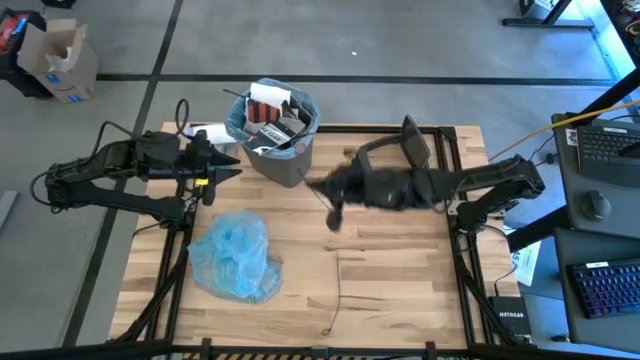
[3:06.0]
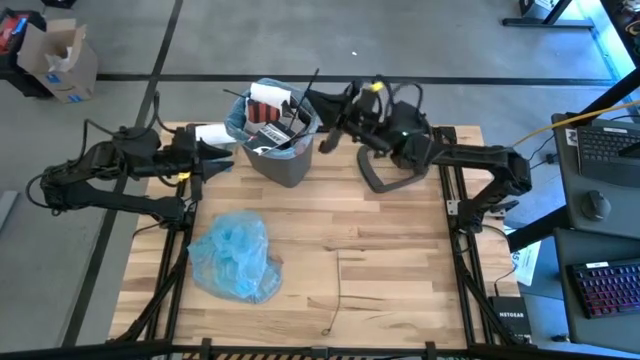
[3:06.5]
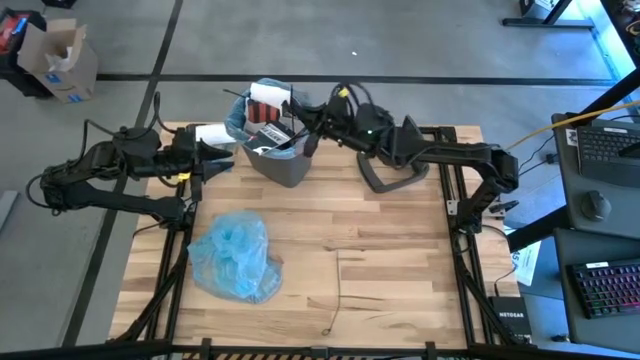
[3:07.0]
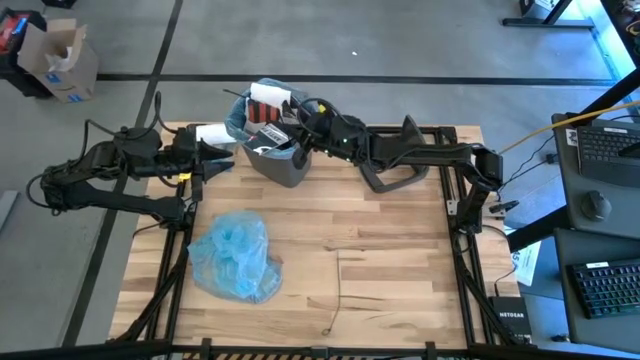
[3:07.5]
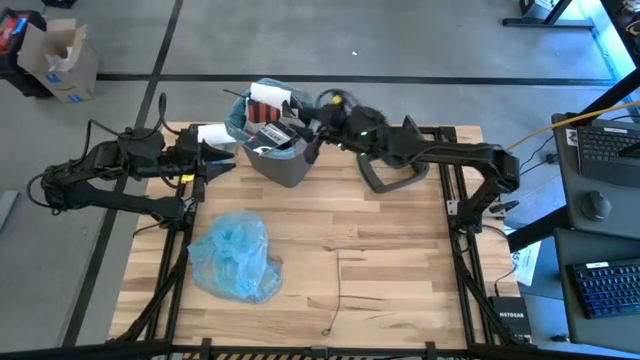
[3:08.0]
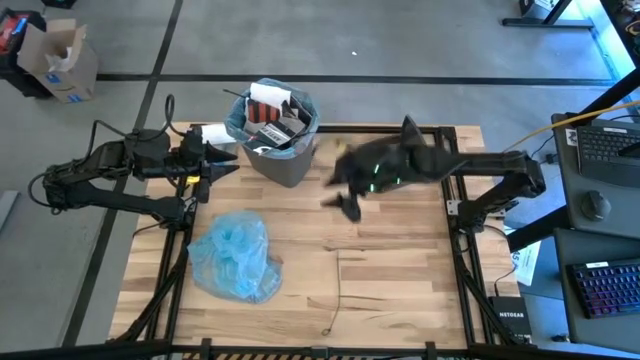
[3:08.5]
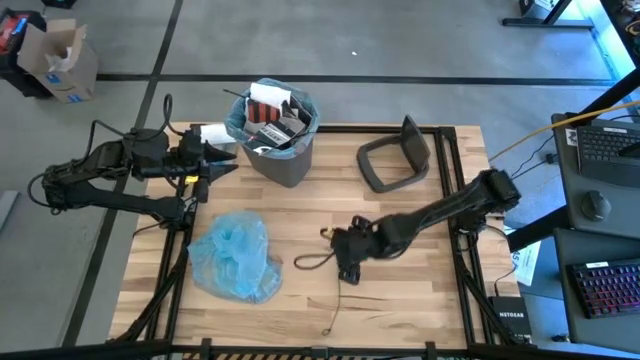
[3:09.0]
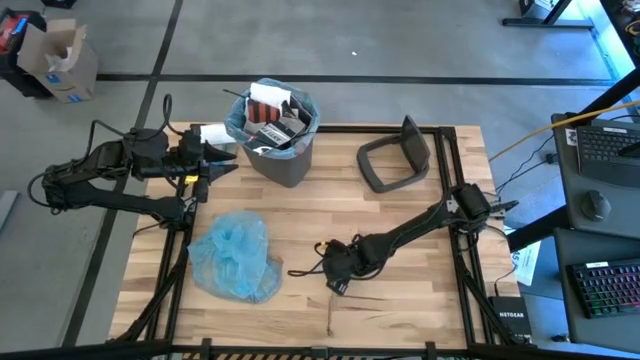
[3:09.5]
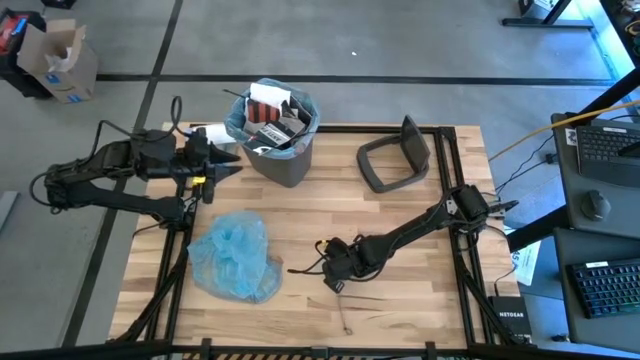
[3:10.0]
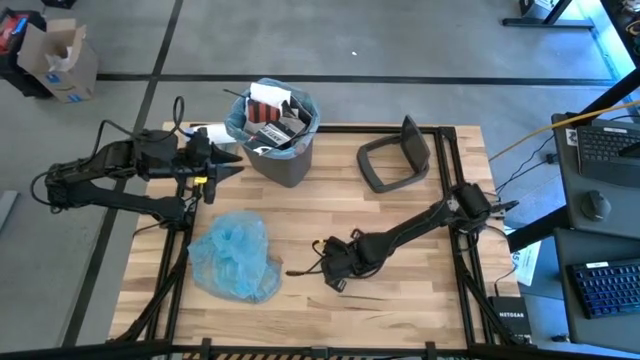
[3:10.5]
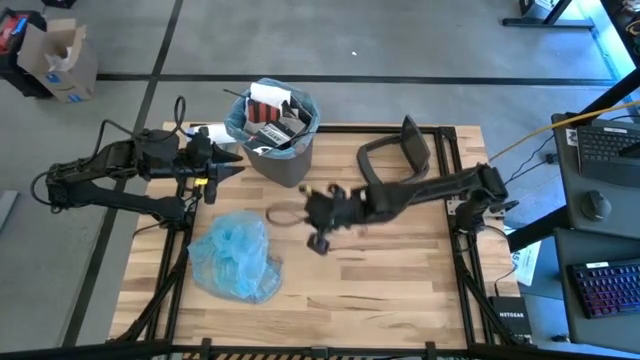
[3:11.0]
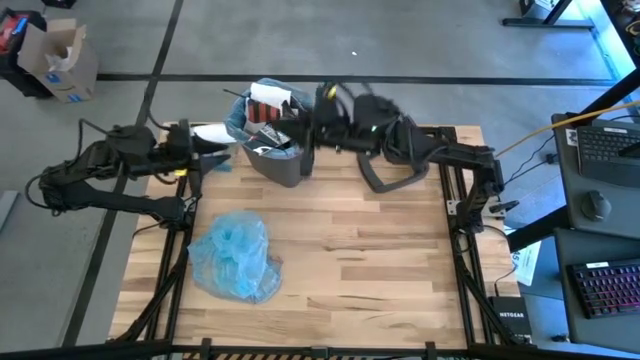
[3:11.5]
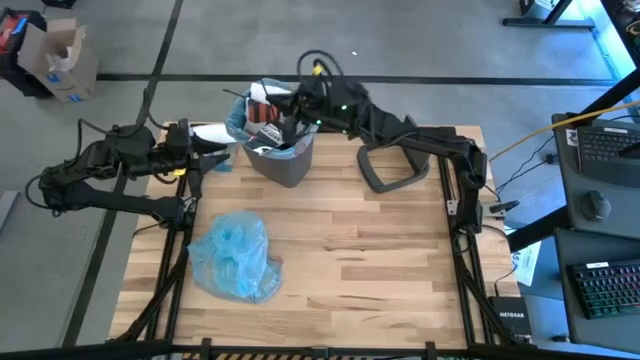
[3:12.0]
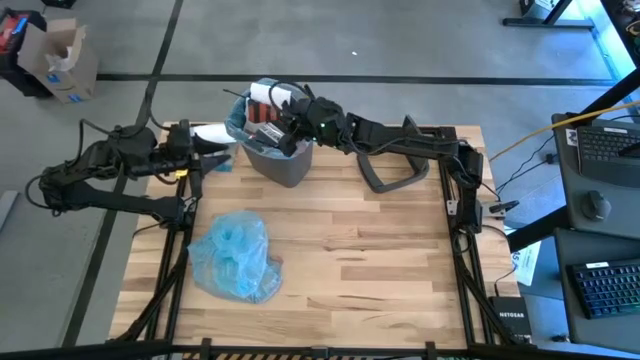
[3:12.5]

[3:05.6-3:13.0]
Task: Pick and place trash into bin
Put the zip tie into the trash bin

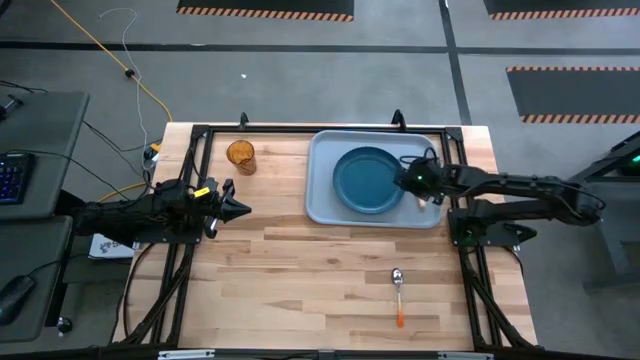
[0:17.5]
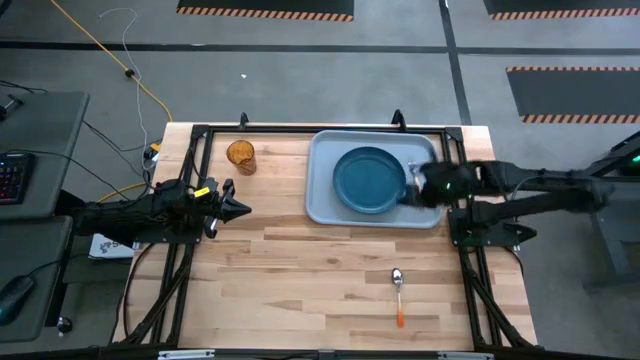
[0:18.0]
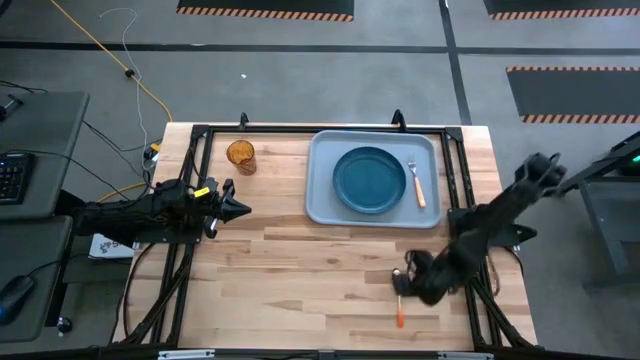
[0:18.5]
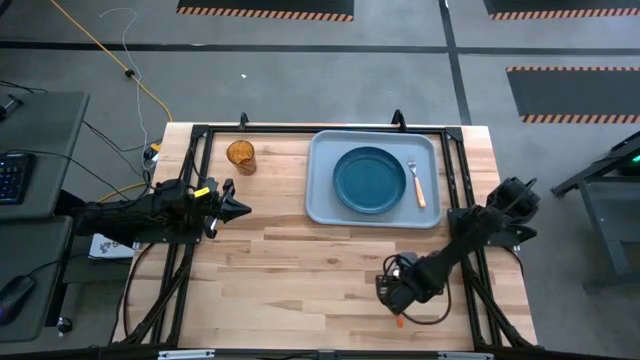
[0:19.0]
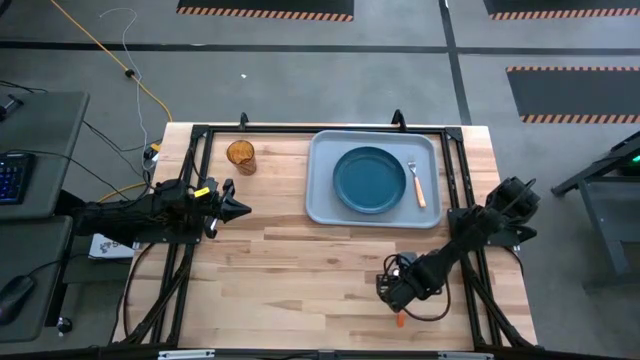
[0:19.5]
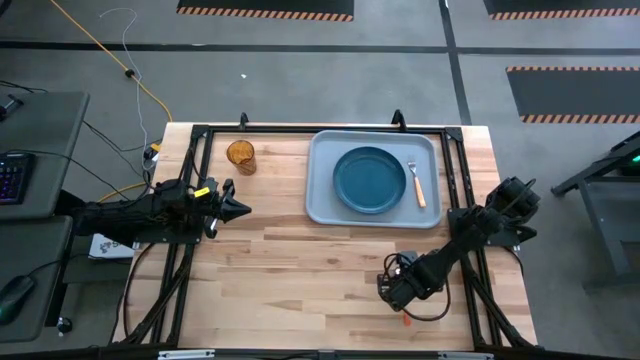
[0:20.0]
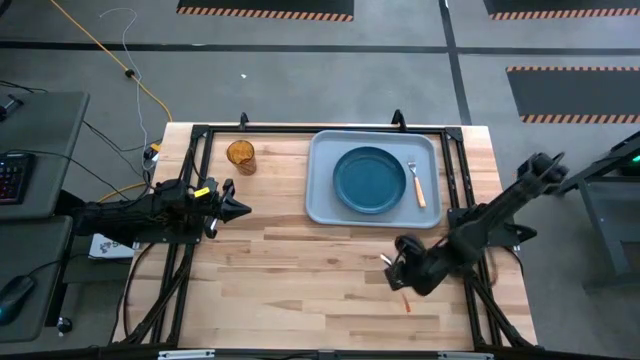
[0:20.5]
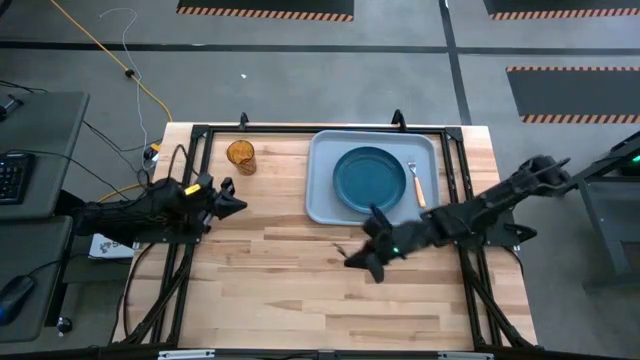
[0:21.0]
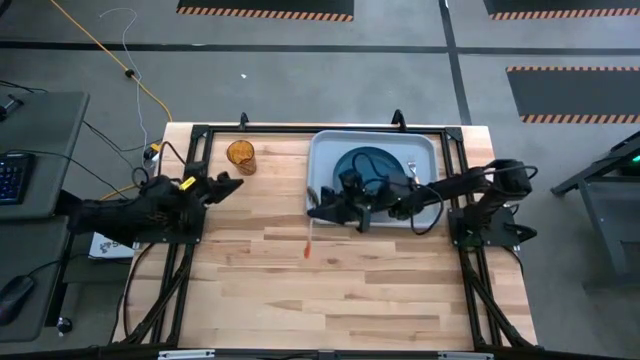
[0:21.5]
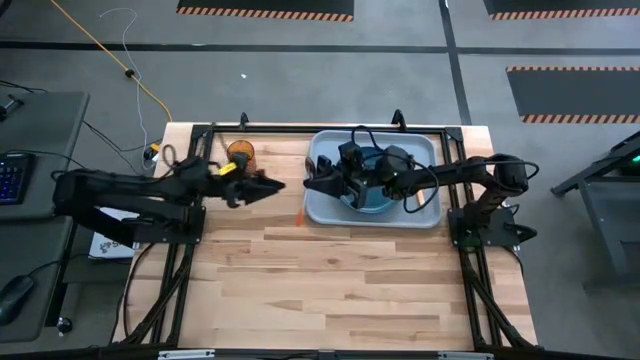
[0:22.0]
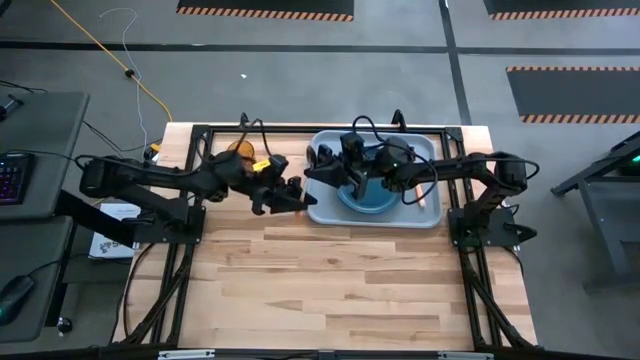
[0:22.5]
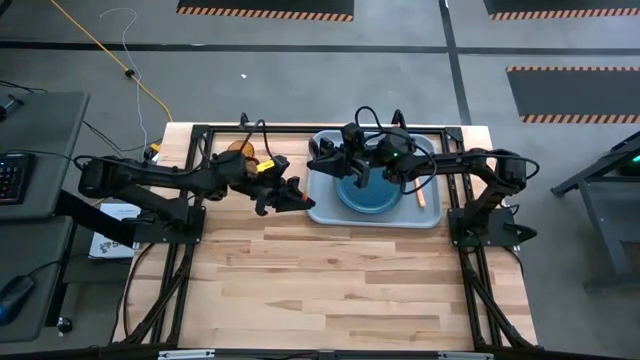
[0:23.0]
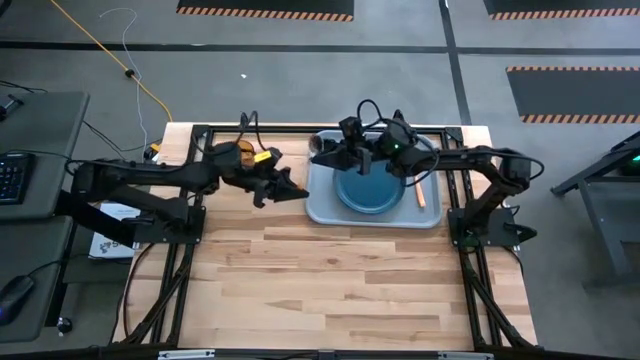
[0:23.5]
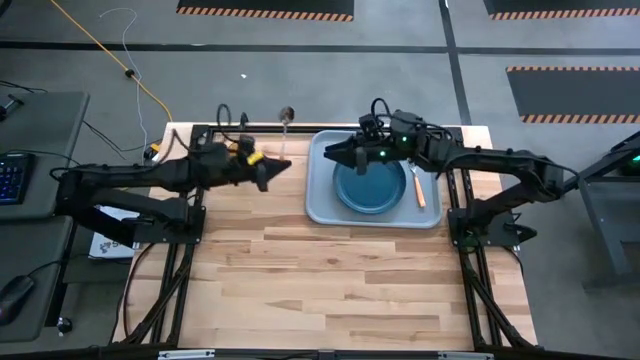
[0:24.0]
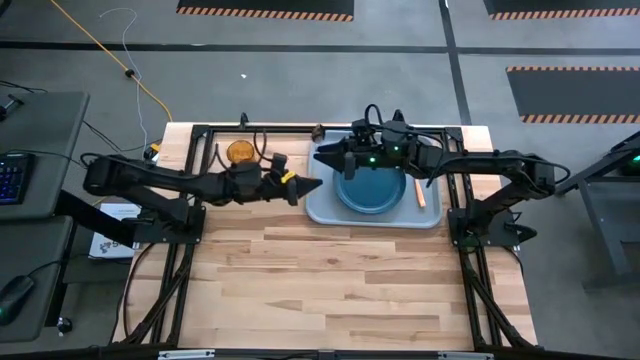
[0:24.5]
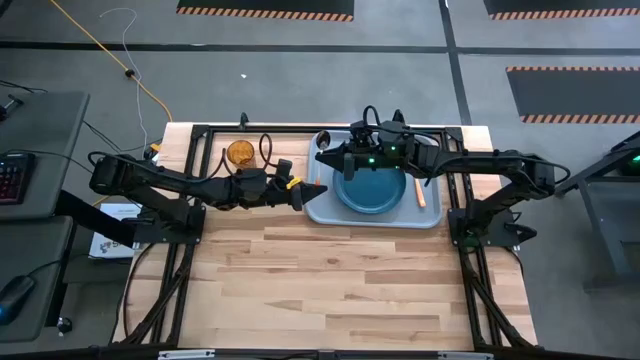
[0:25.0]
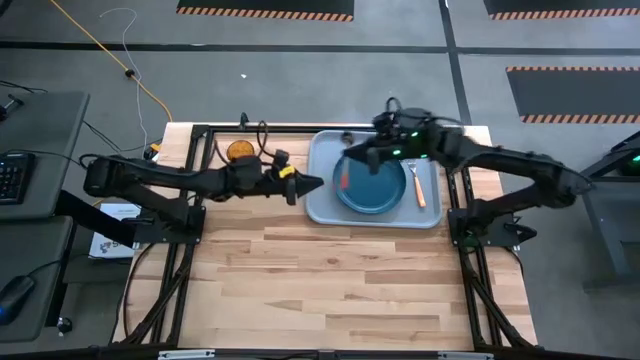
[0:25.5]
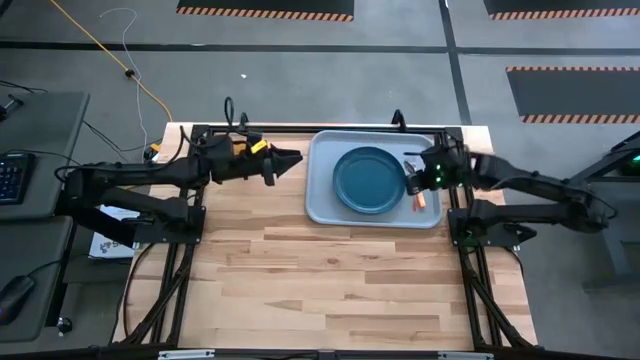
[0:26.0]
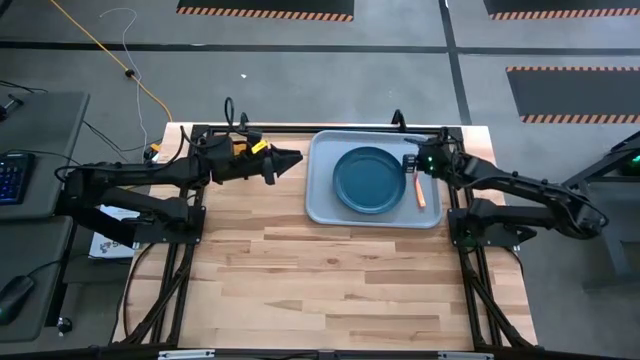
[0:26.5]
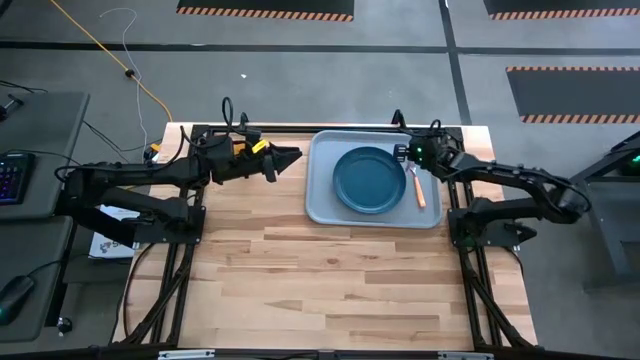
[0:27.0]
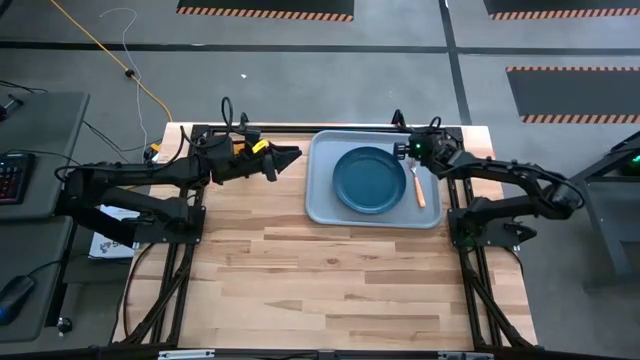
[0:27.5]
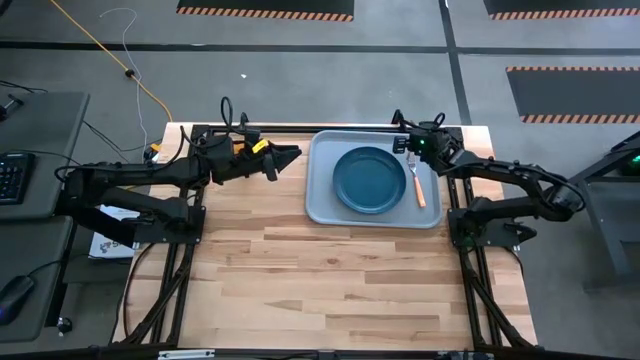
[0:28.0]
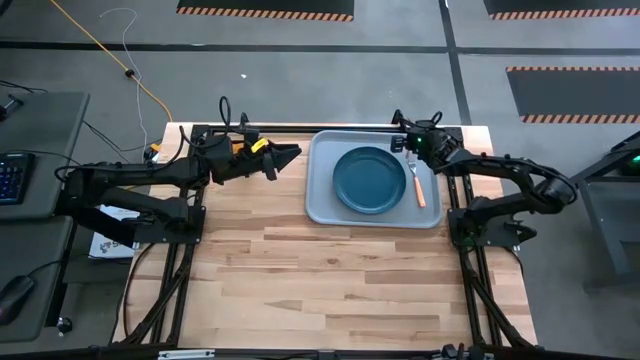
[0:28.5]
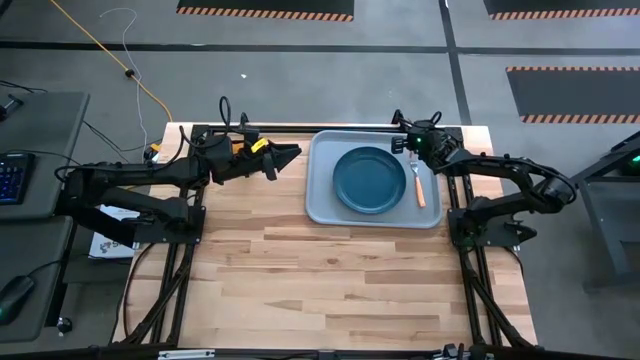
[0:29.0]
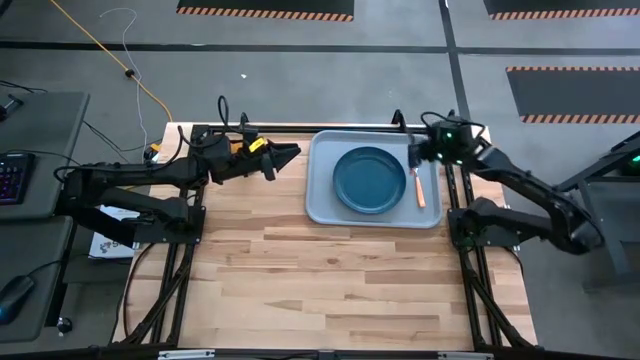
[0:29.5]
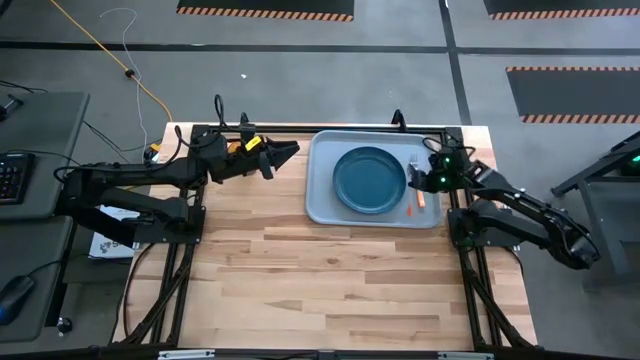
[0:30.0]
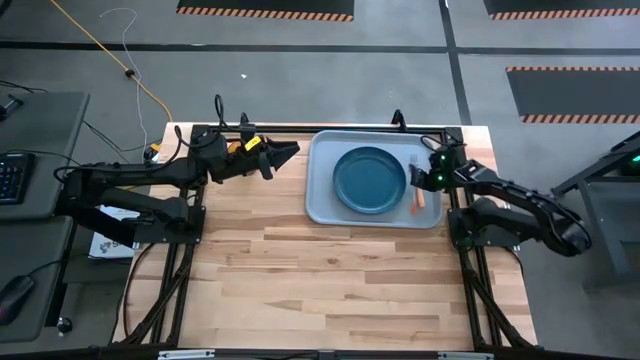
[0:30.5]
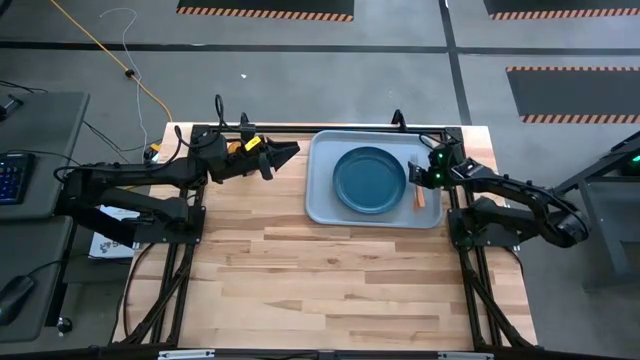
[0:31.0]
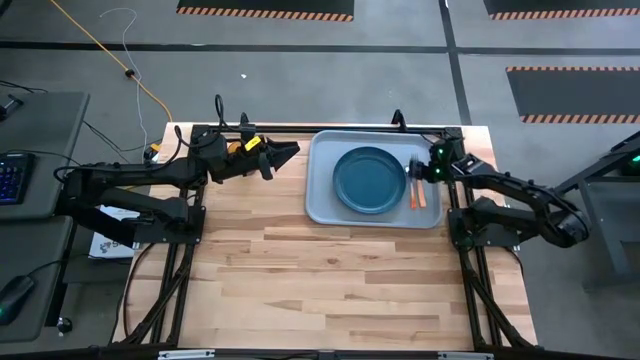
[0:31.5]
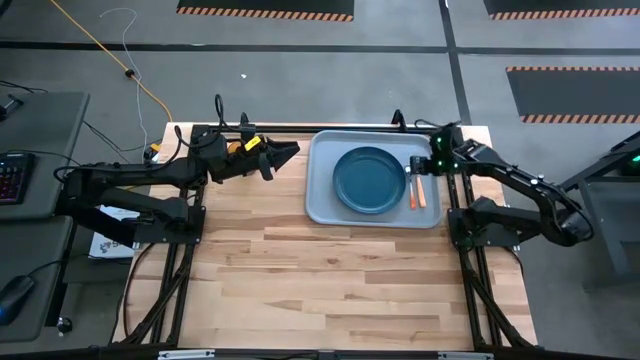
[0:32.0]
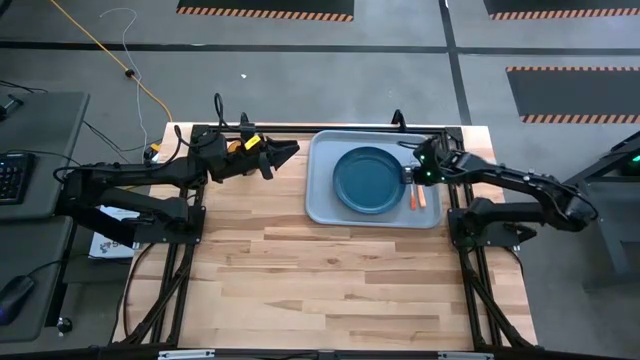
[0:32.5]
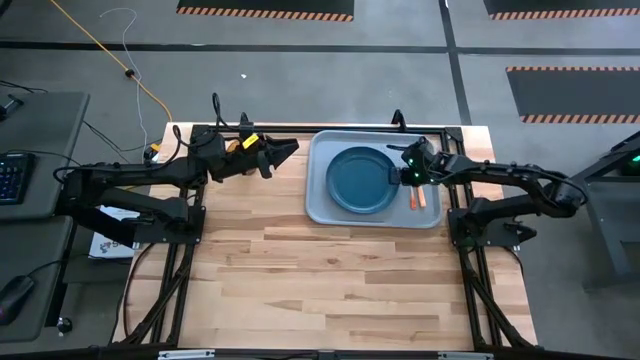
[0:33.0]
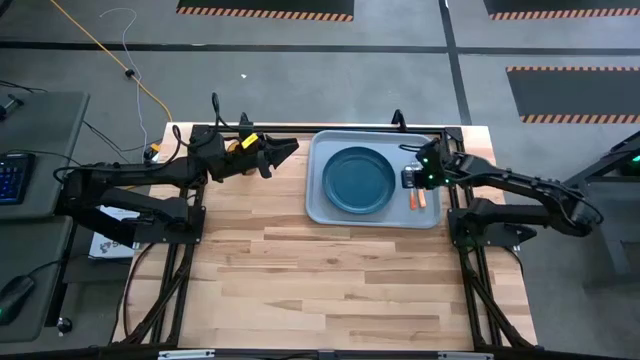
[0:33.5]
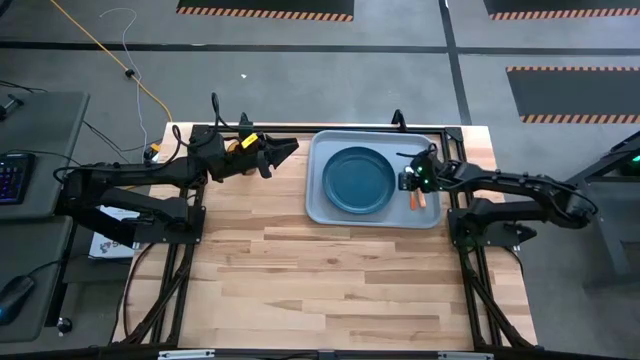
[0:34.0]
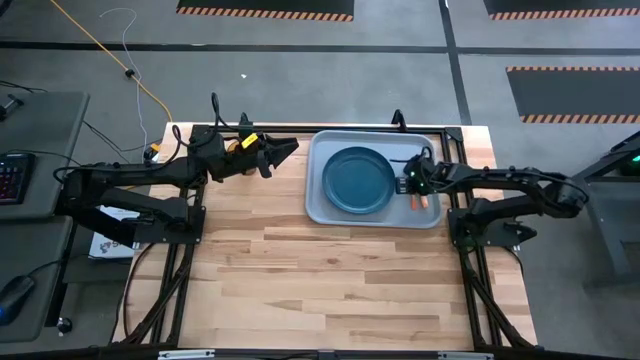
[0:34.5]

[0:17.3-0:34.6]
Task: Pick and place plate/cup/fork/spoon on tray
Put the orange spoon on the blue tray to the right of the blue plate
